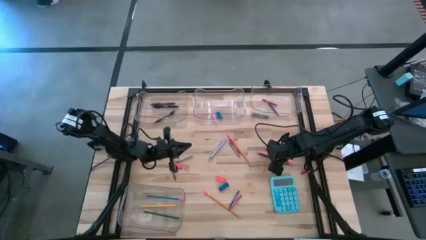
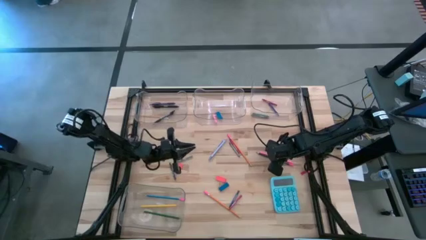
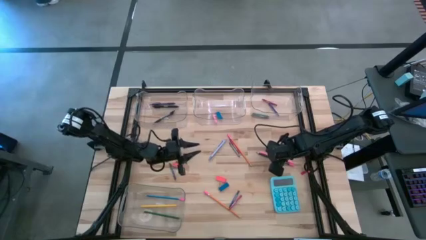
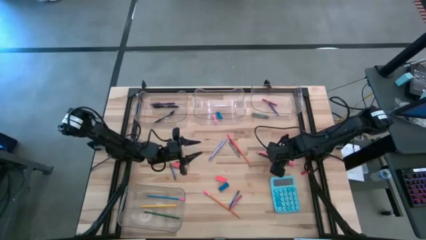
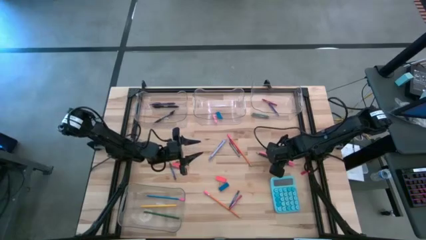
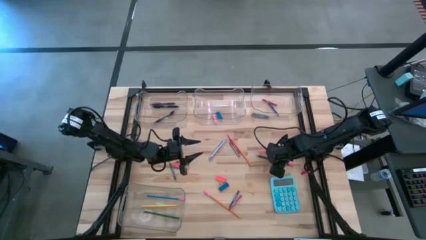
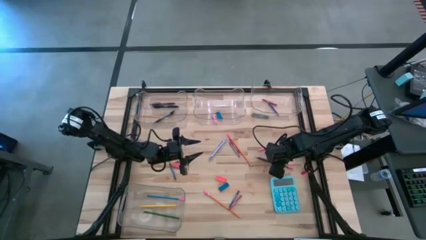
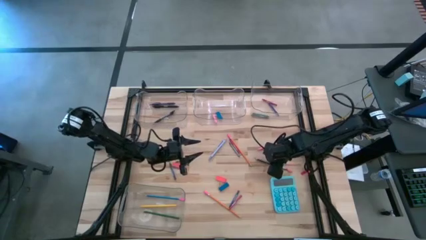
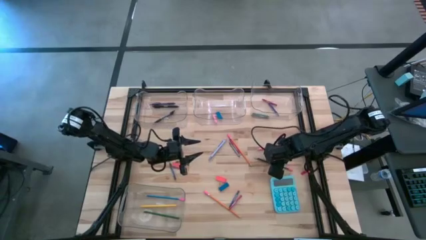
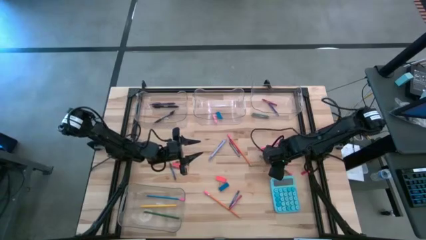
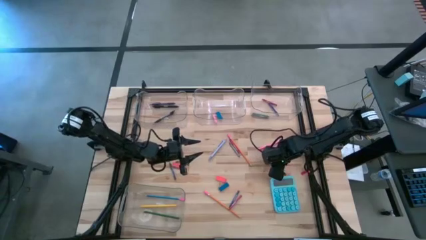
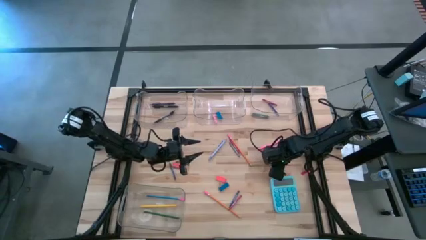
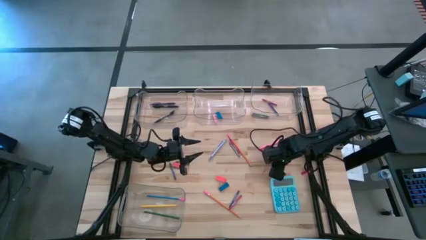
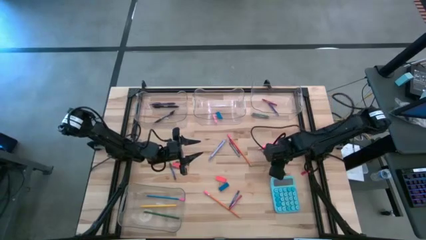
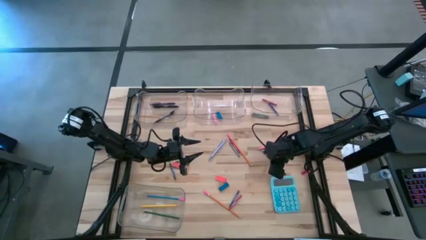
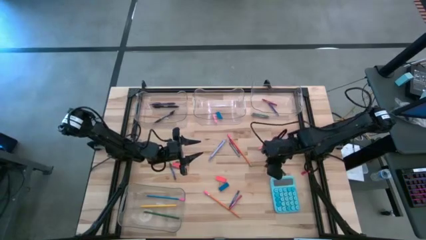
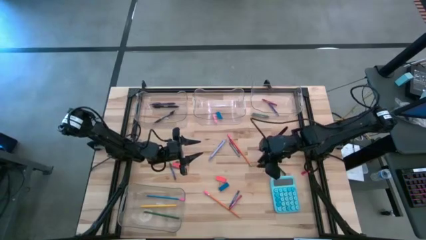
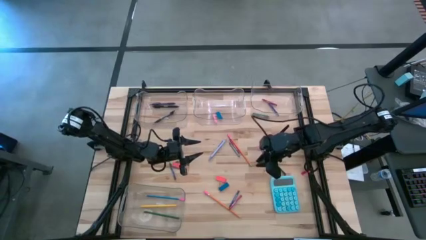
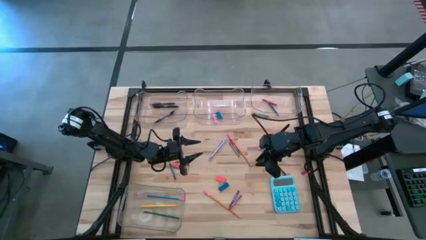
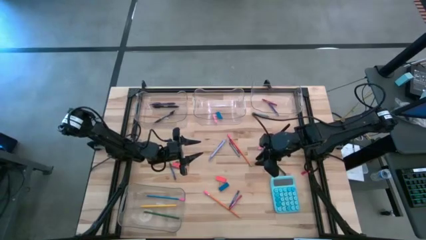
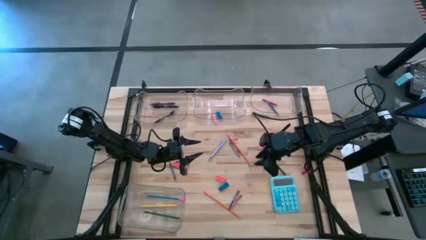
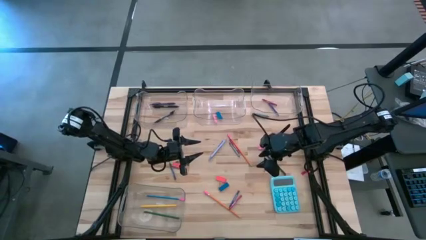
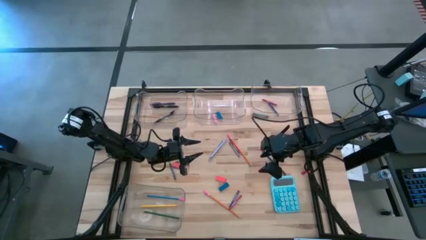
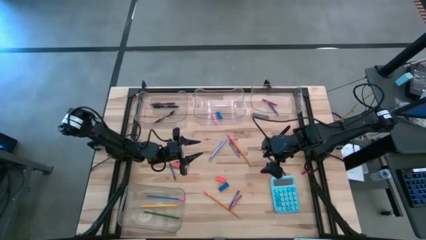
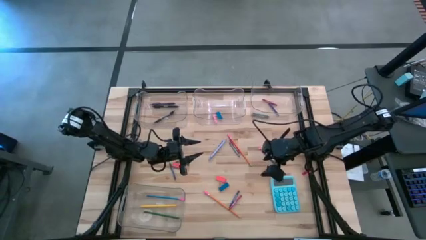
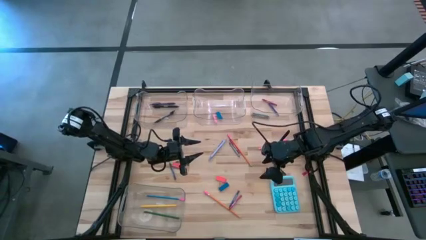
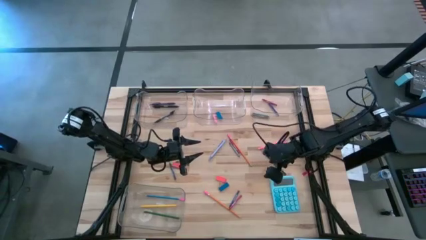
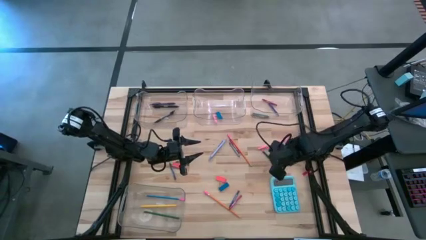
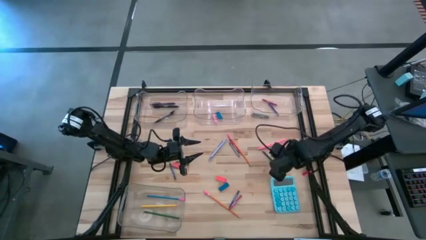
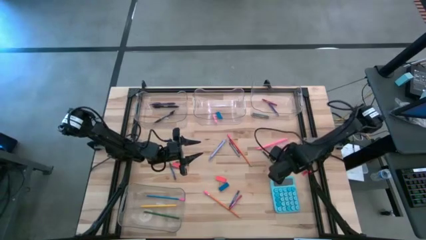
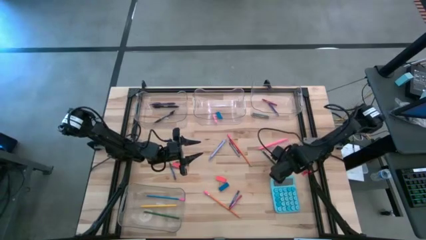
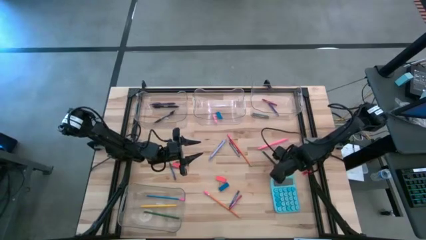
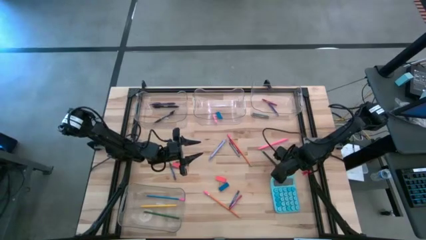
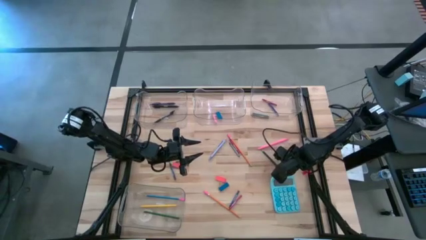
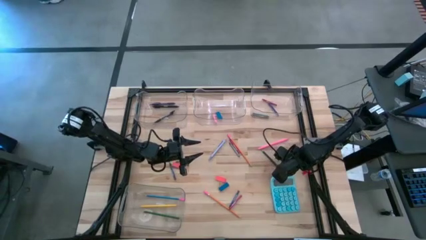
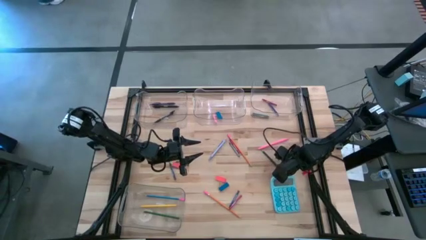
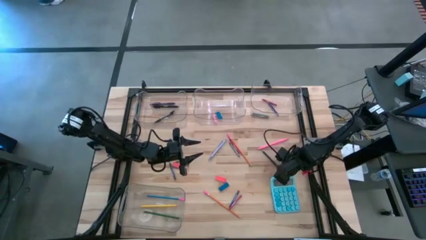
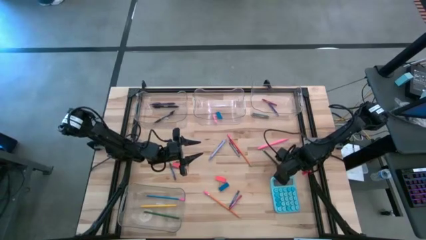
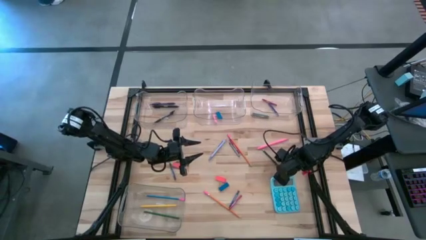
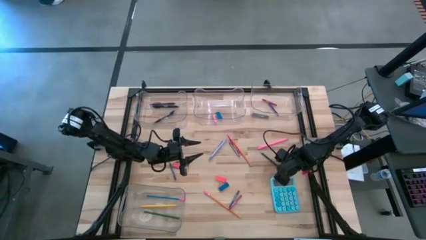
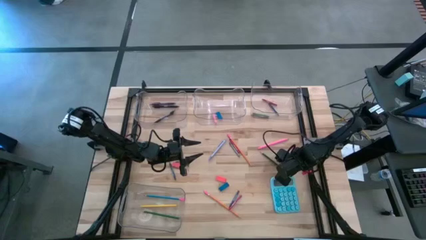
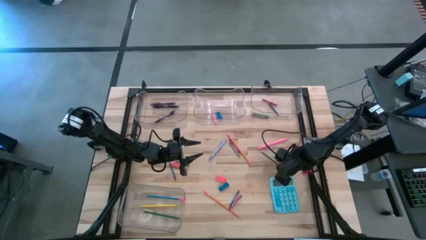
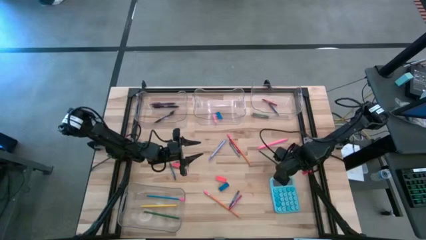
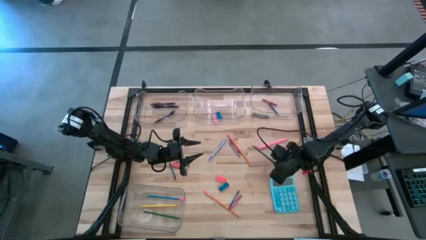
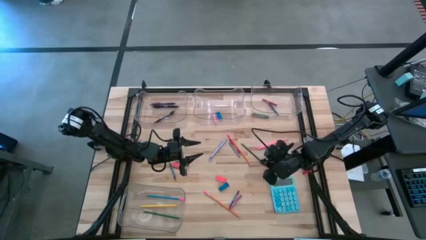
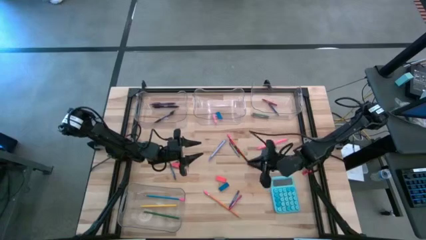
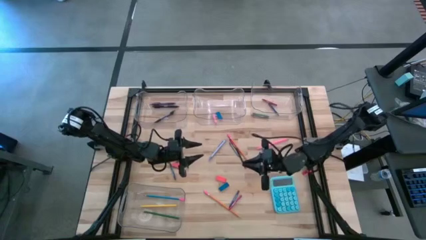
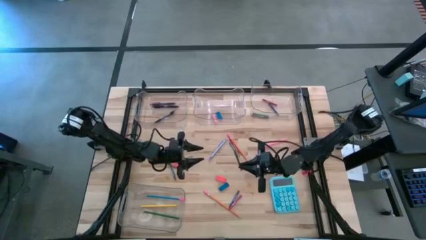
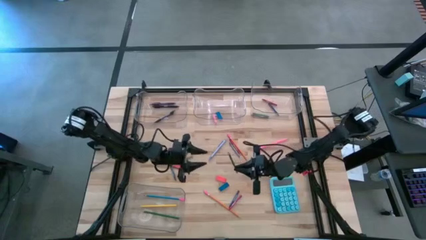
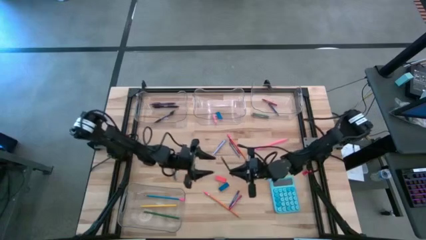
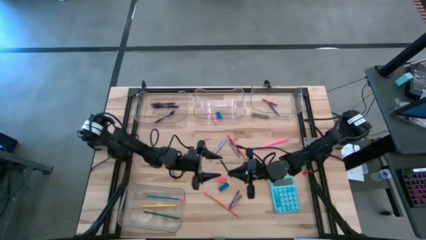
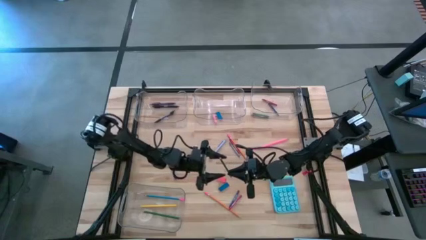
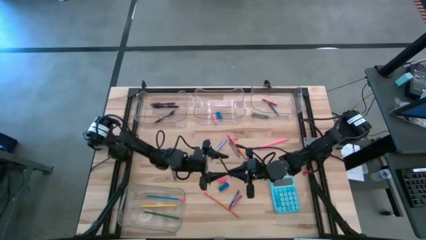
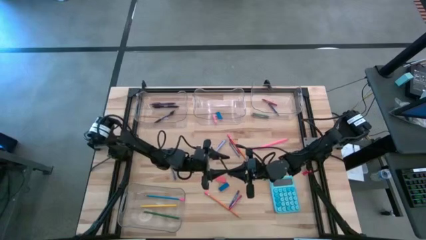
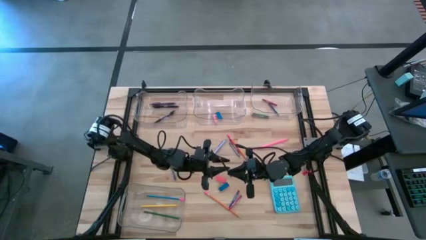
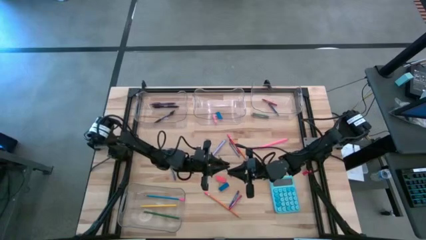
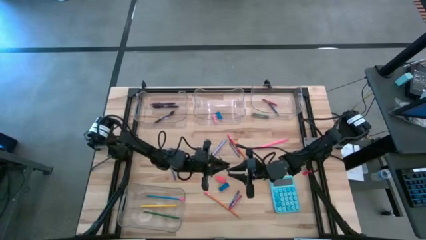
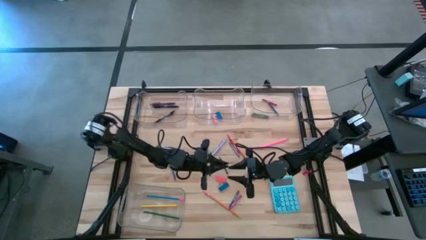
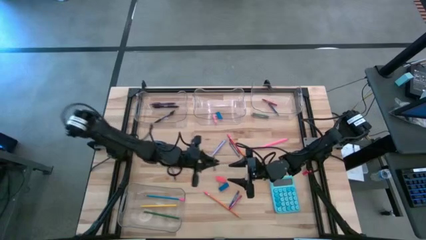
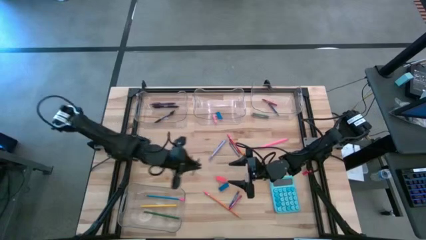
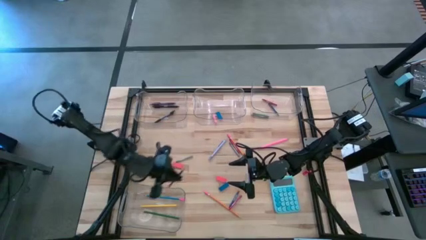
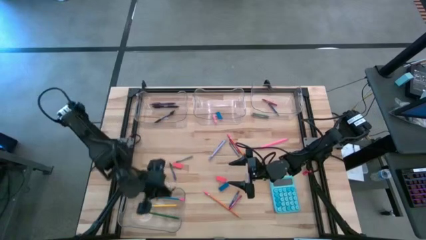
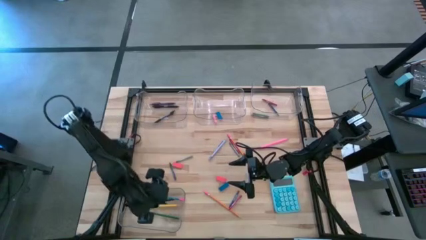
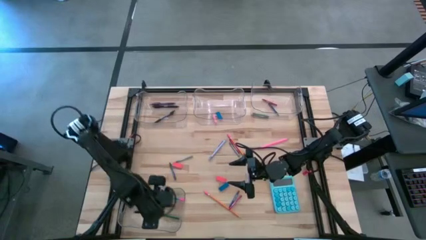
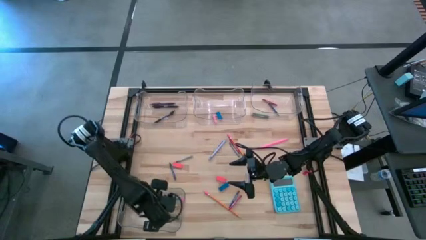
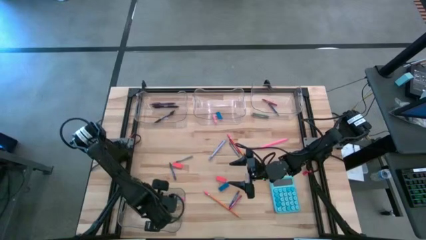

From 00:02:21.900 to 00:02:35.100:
Task: Sort crayons/erasers/pens/pencils in bins
Put the dark green pencil into the bottom transparent bin

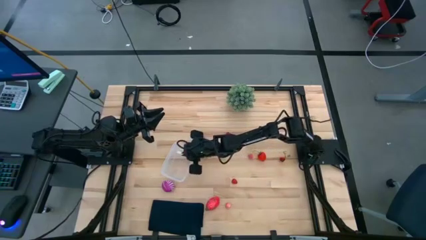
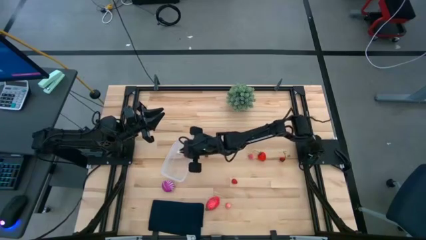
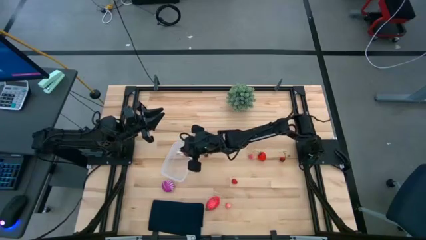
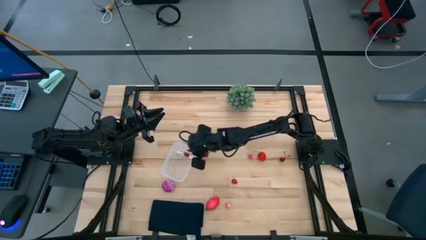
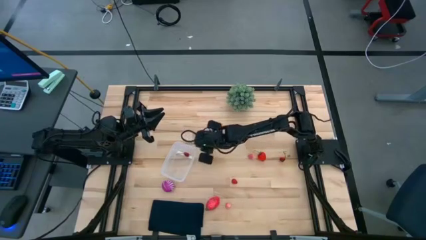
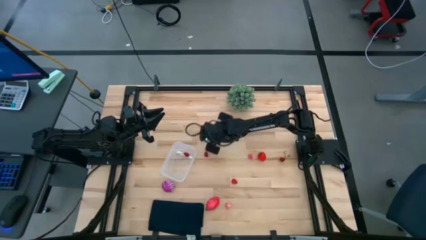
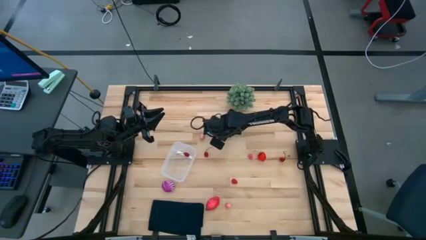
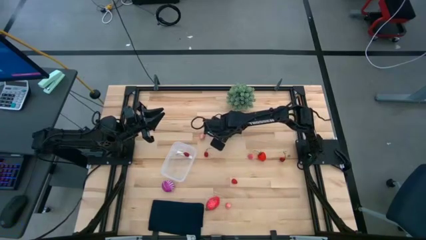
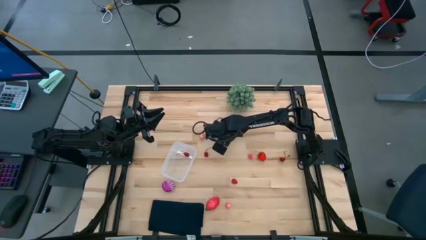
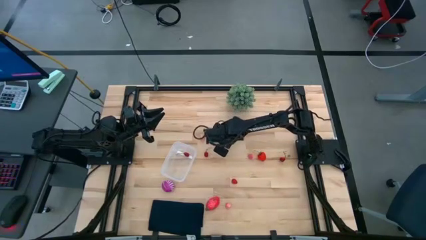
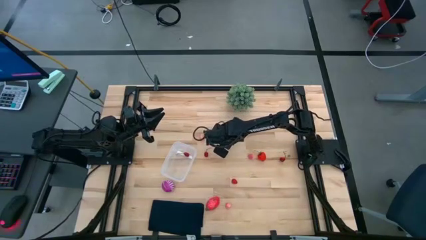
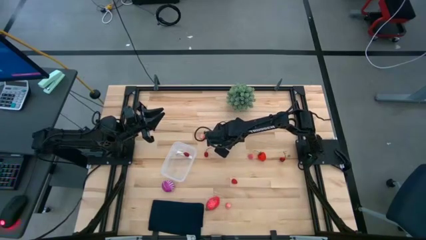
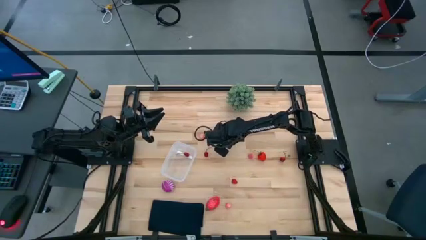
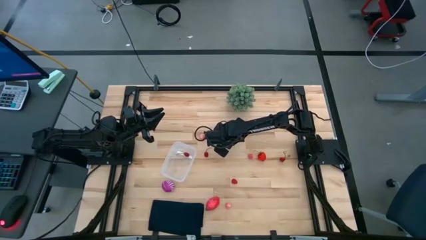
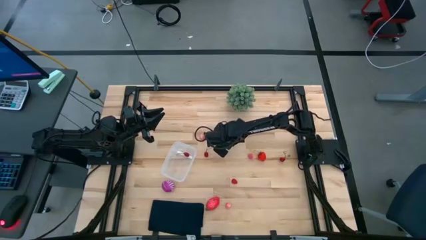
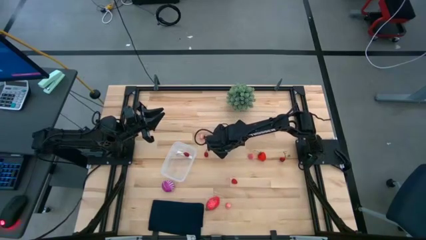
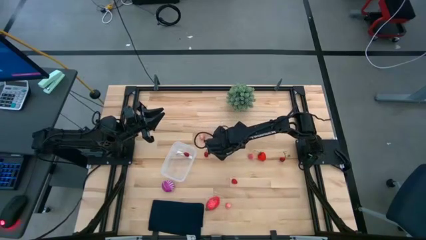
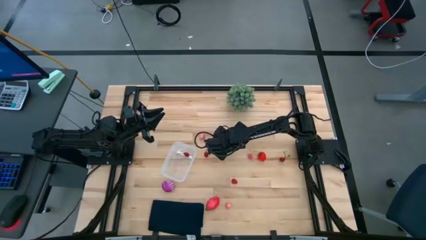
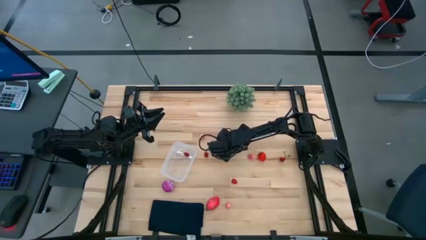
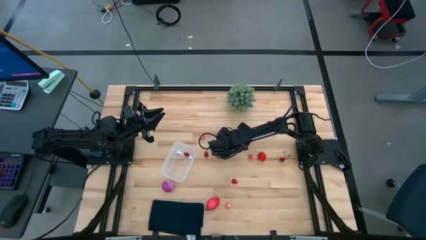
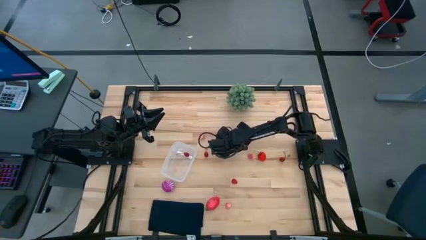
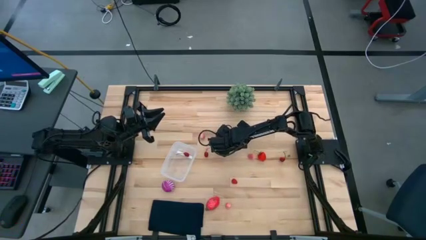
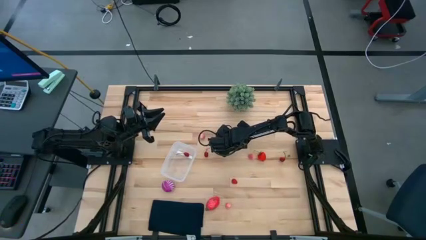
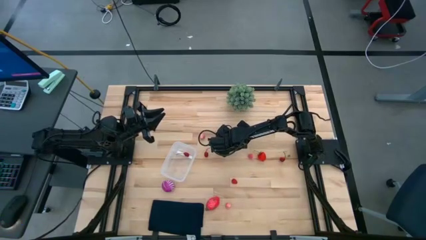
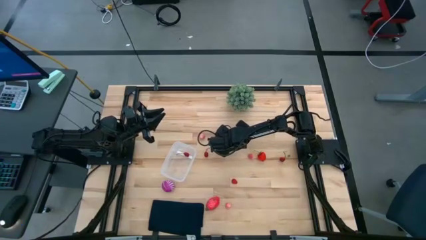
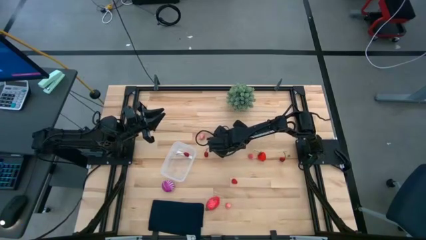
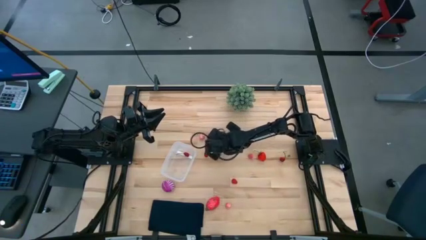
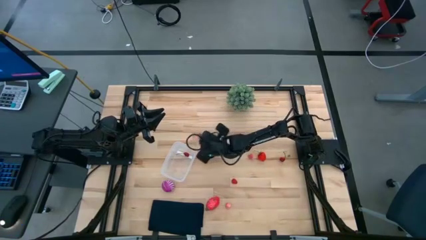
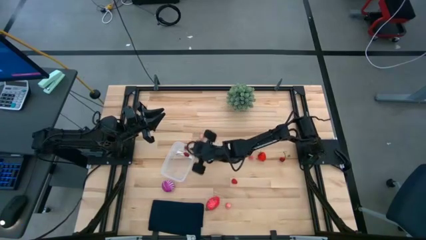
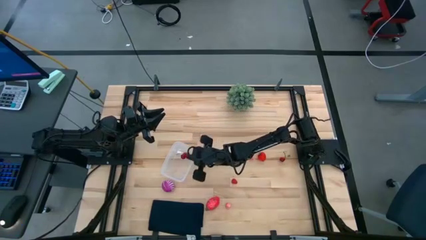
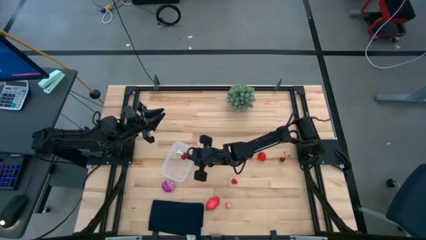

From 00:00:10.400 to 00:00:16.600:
Task: Pick and placing Produce into tupperware
Put the red cherry into the transparent bin
